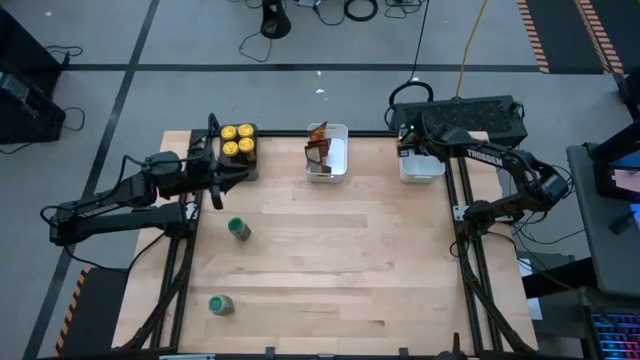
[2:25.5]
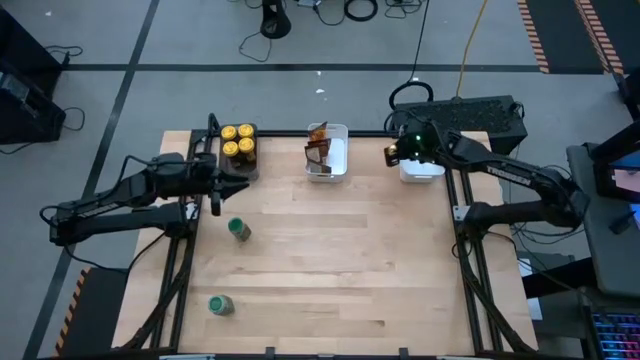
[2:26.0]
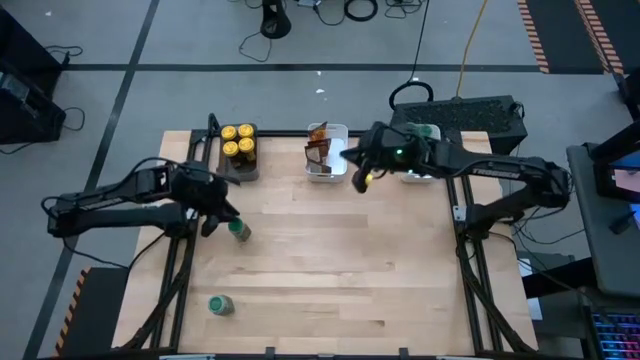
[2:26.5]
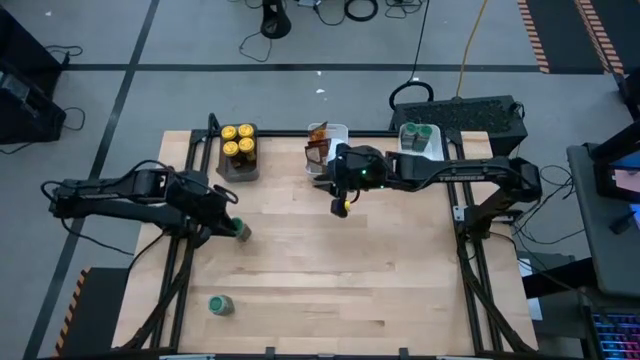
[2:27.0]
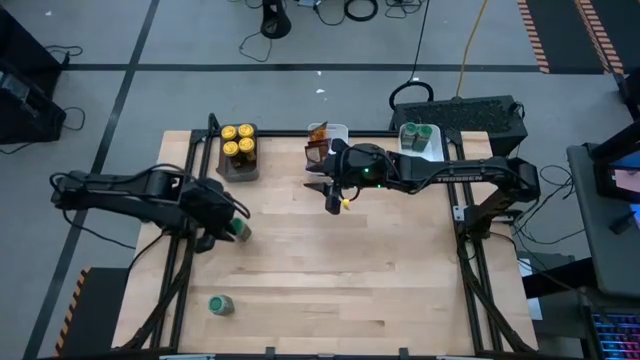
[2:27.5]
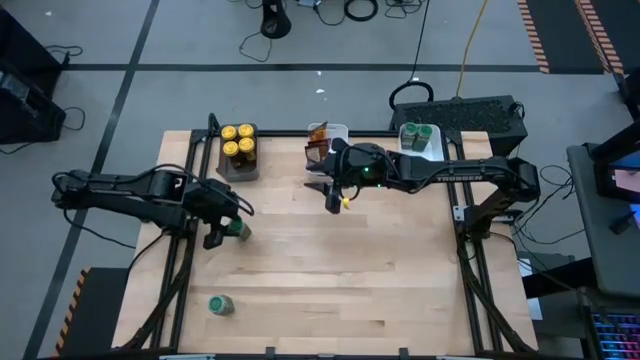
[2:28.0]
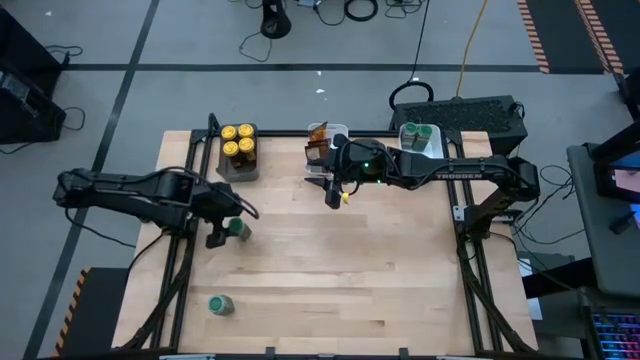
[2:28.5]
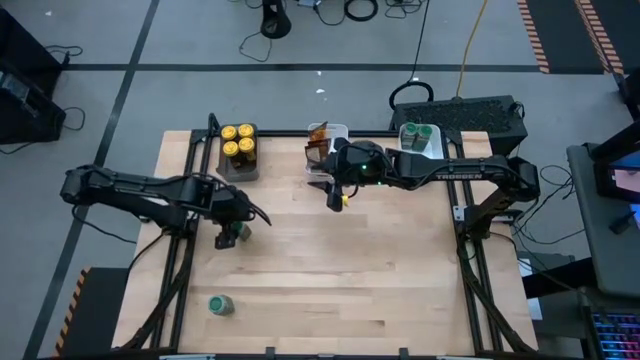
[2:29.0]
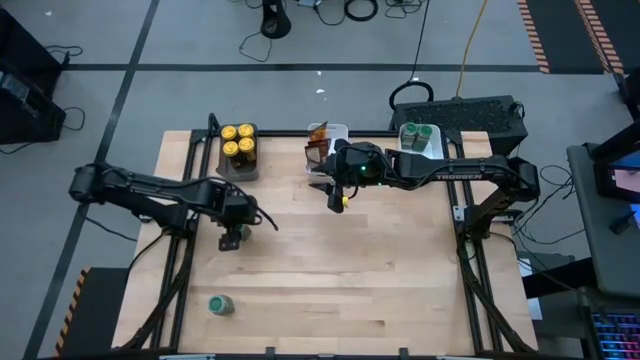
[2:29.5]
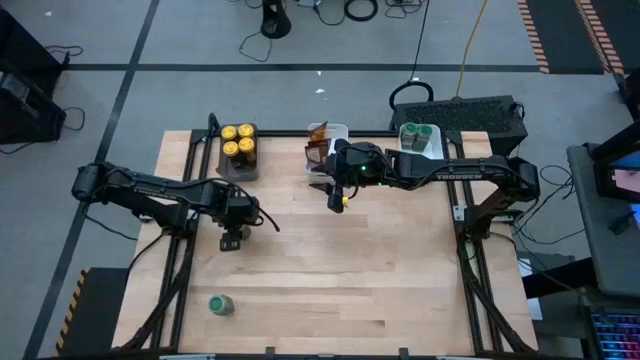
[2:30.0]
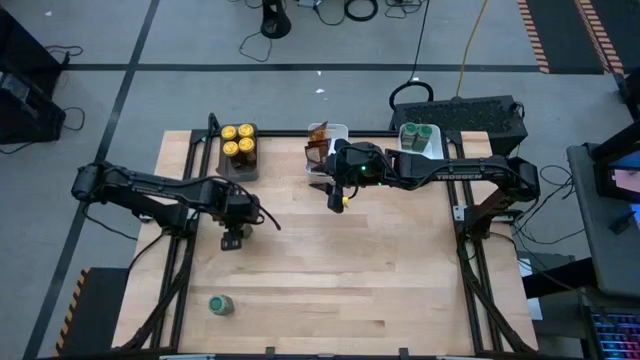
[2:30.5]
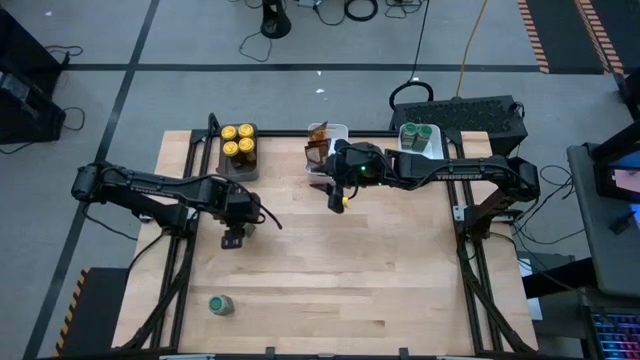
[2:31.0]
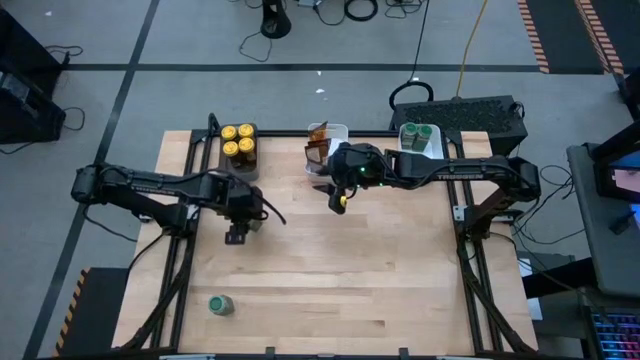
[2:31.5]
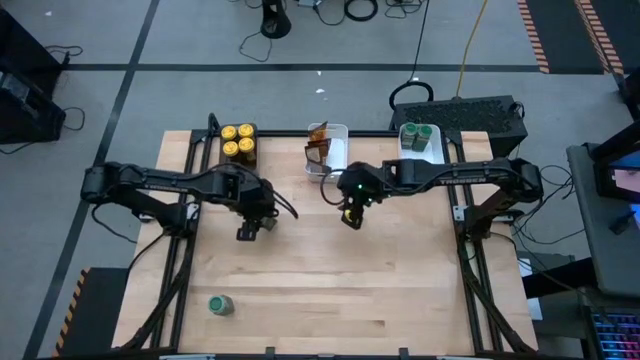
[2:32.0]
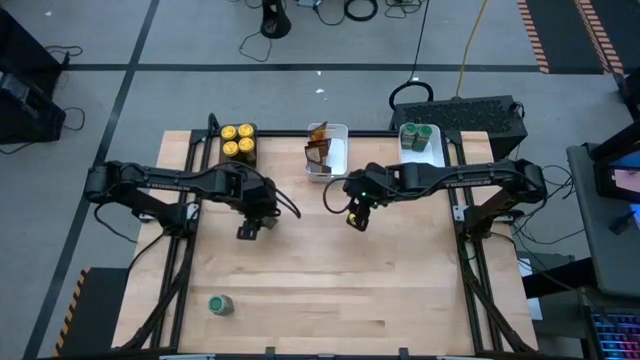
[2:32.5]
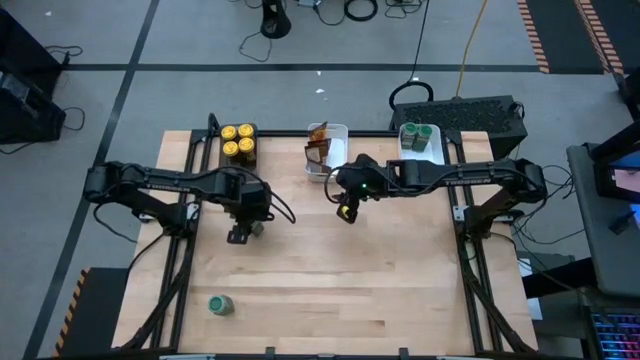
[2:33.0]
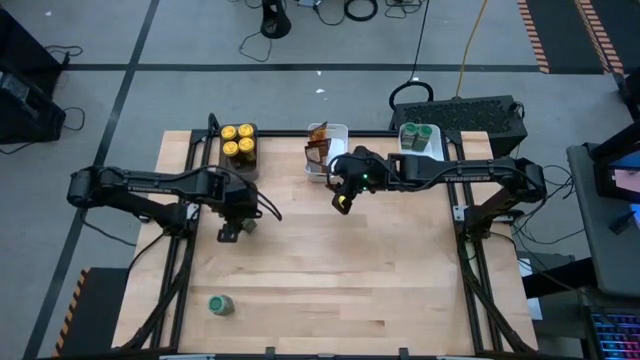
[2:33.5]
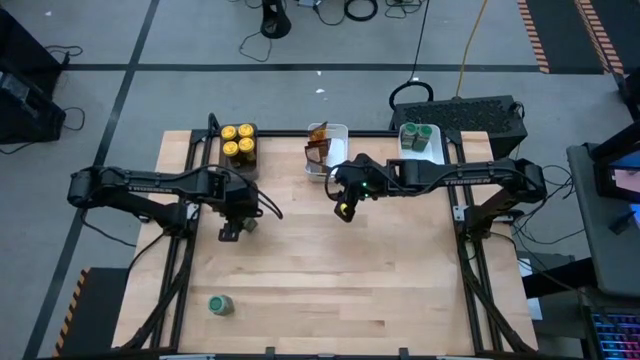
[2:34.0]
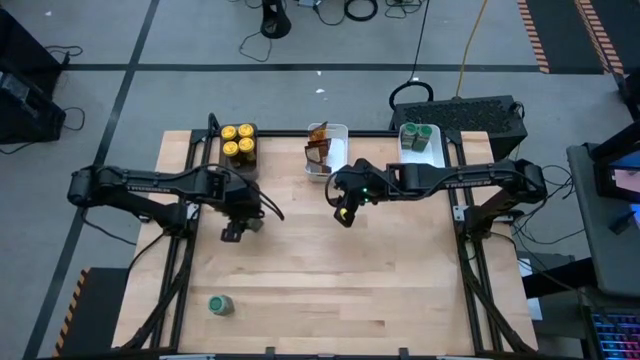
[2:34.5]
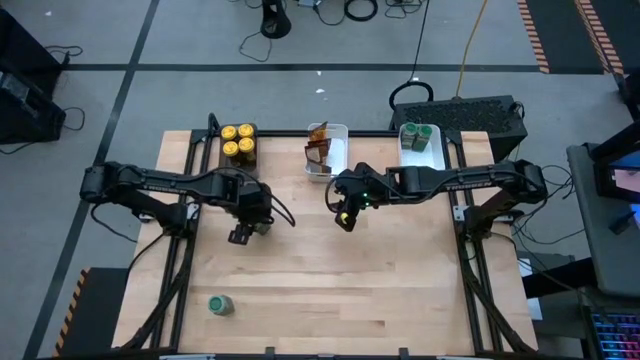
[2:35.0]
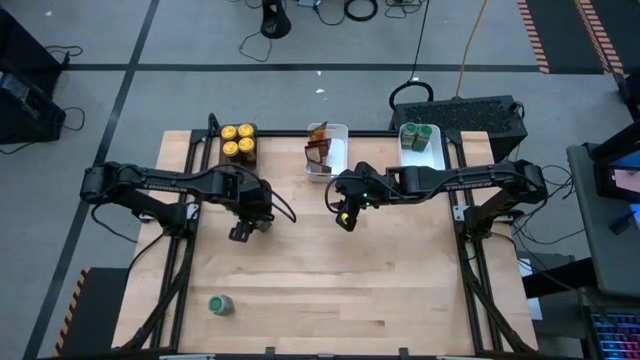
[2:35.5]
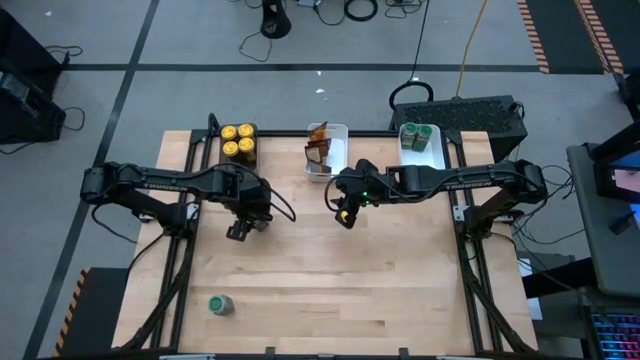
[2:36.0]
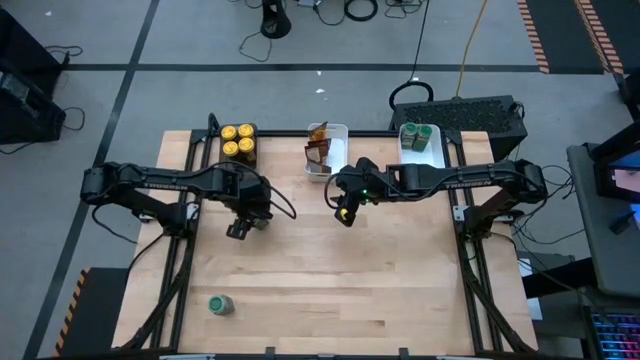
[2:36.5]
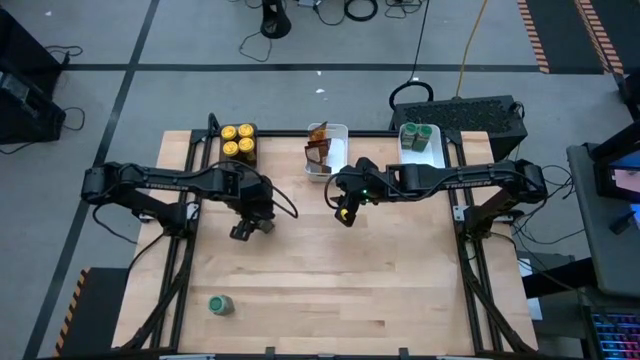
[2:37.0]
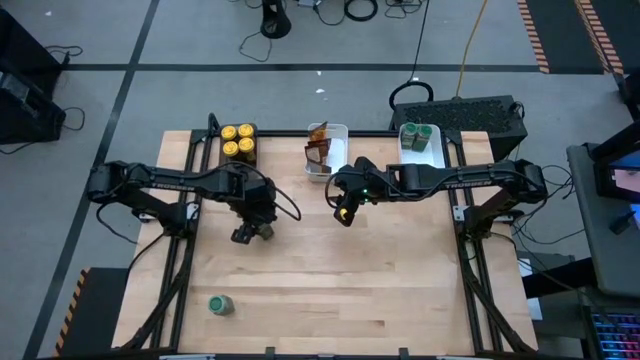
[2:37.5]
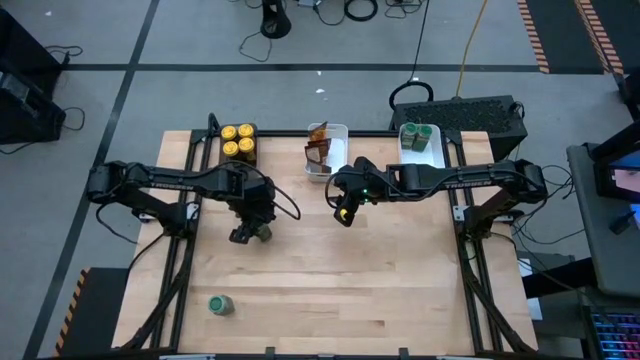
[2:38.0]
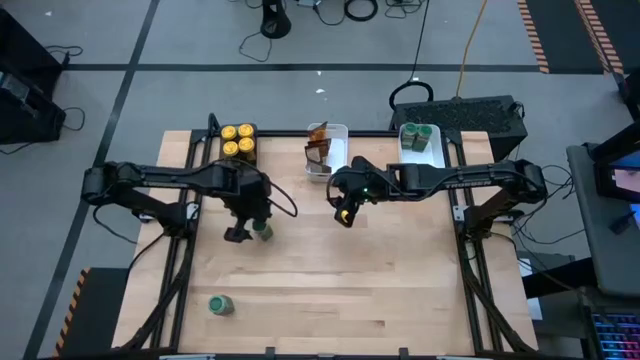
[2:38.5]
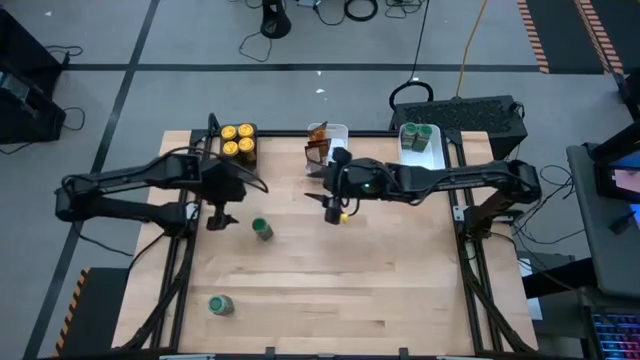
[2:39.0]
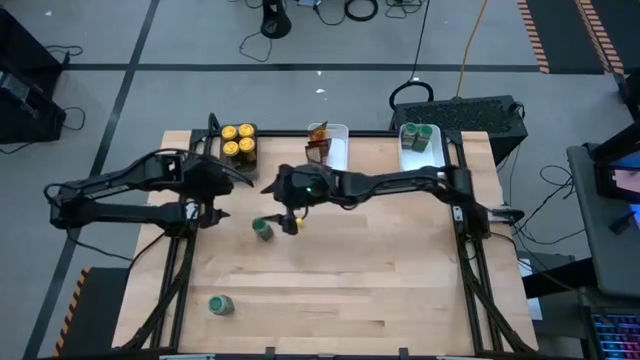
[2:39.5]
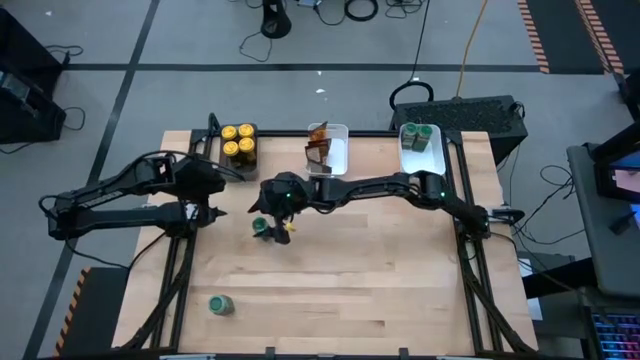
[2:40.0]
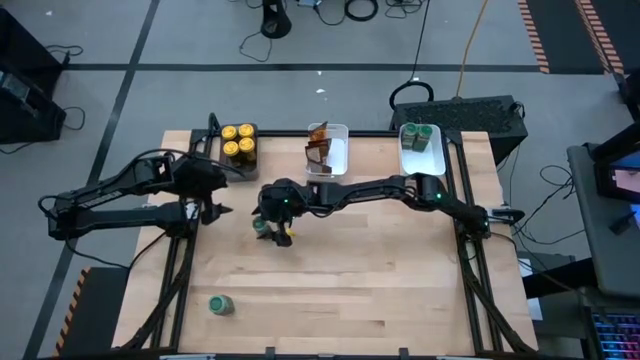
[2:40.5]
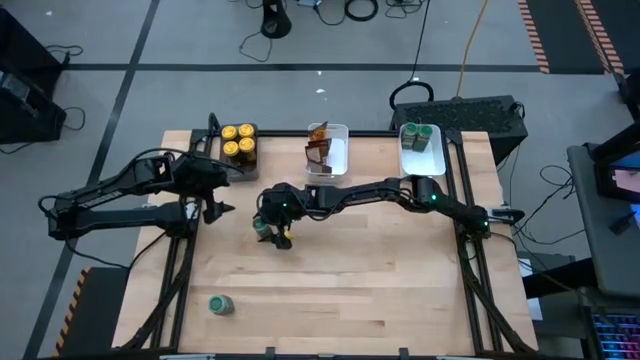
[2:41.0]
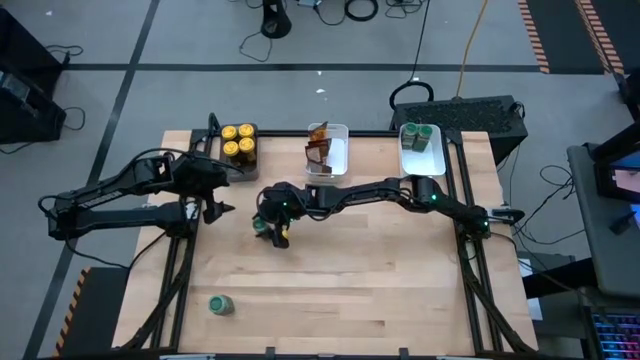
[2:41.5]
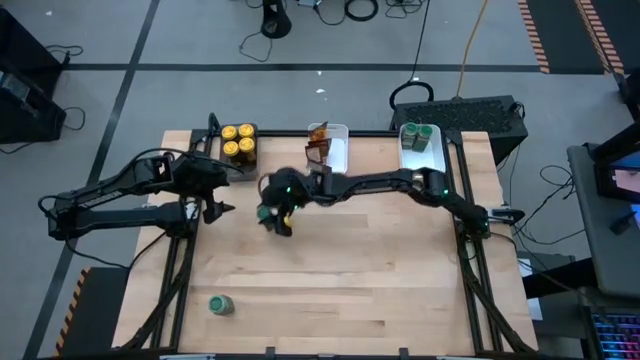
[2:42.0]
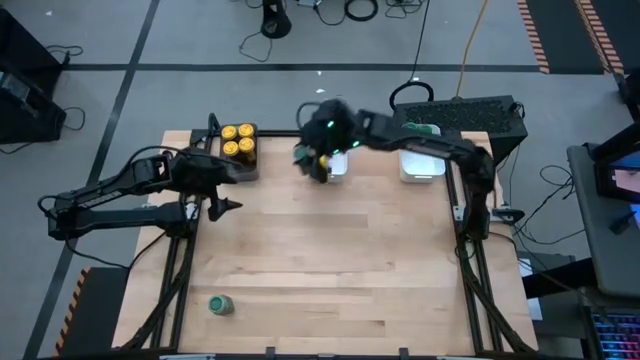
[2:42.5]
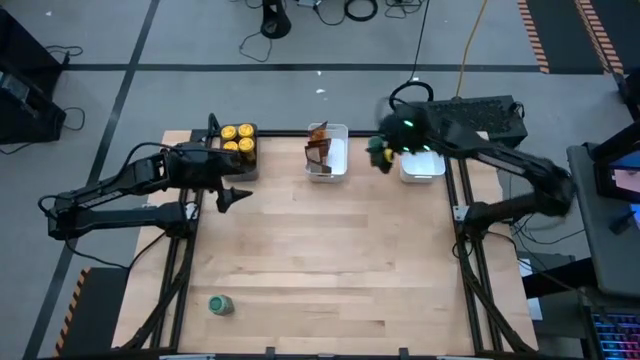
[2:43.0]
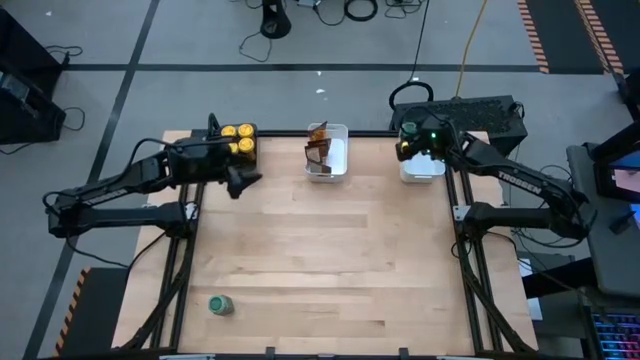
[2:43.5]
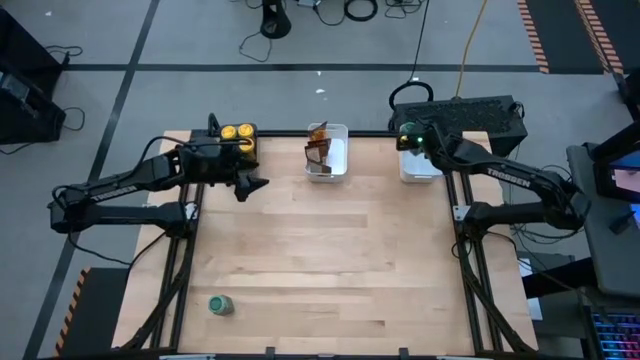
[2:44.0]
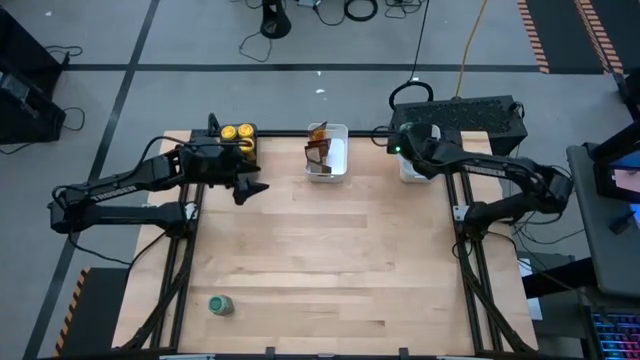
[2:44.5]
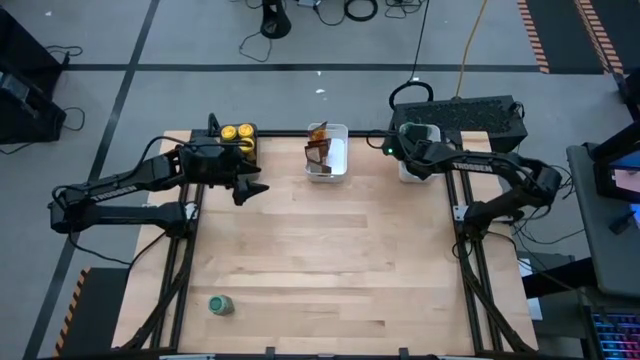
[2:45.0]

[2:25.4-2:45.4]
Task: Sort spices by type
Put the top green seasoning bottle into the right white bin

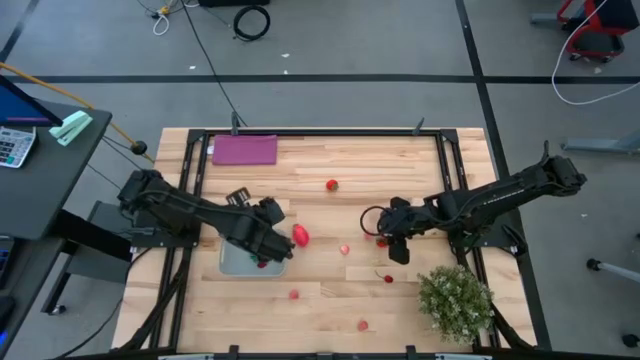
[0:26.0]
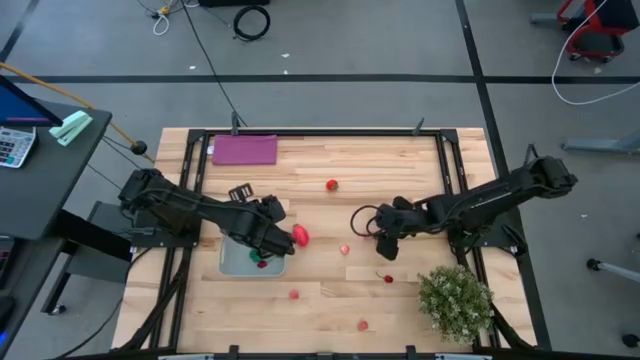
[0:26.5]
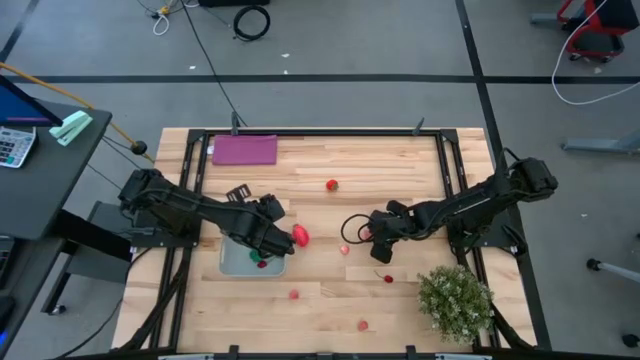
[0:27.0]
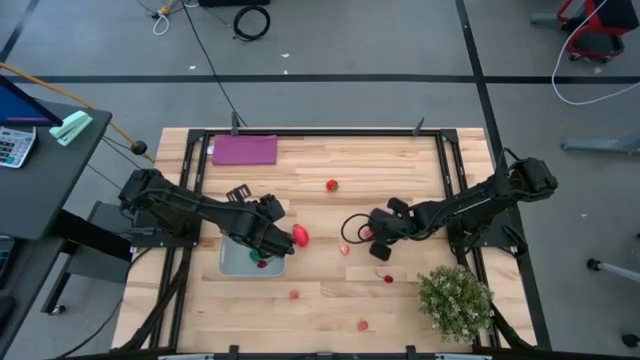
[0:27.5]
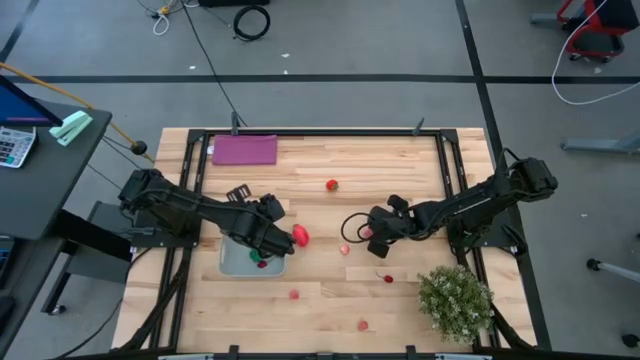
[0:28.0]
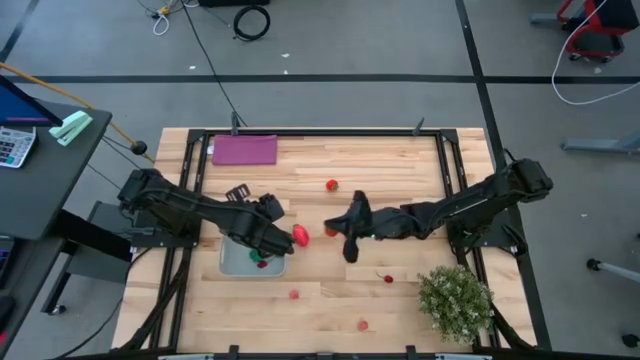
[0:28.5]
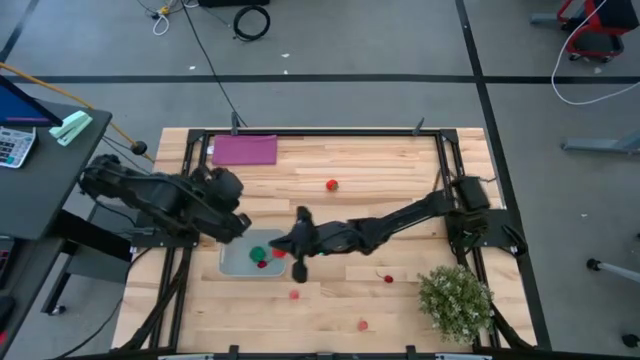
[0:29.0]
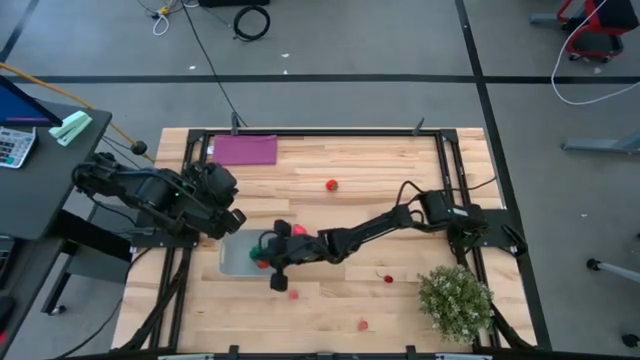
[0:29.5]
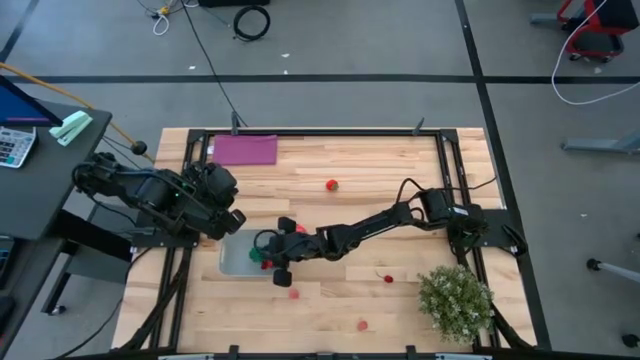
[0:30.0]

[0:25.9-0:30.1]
Task: Pick and placing Produce into tupperware
Put the red strawberry into the gray container
